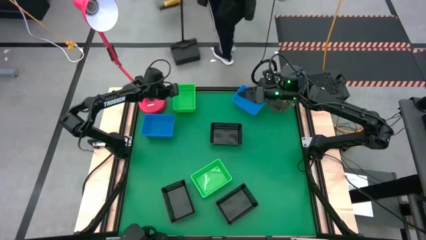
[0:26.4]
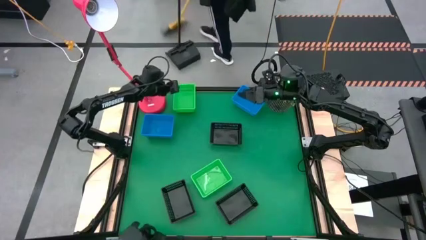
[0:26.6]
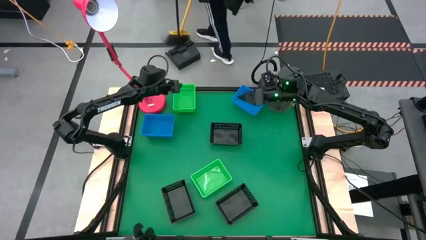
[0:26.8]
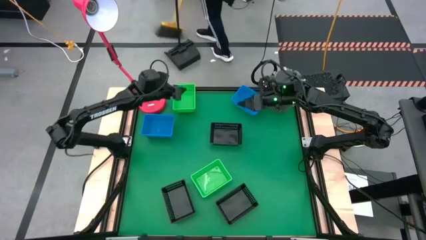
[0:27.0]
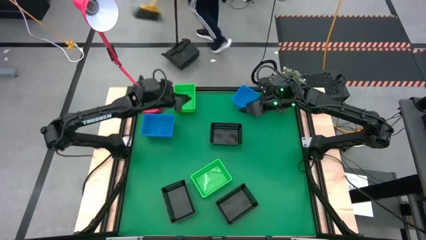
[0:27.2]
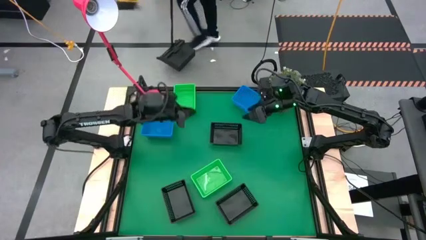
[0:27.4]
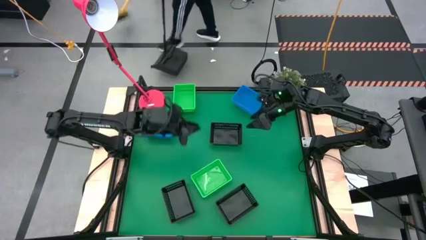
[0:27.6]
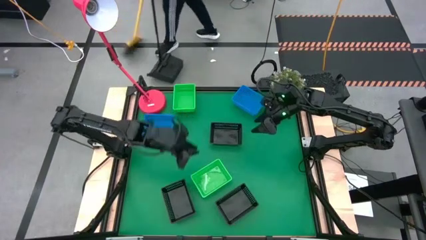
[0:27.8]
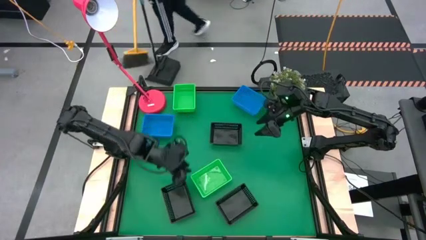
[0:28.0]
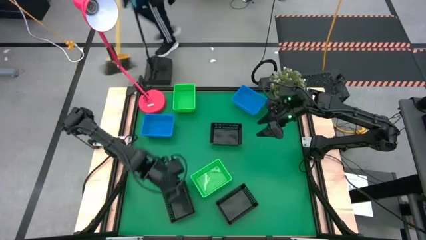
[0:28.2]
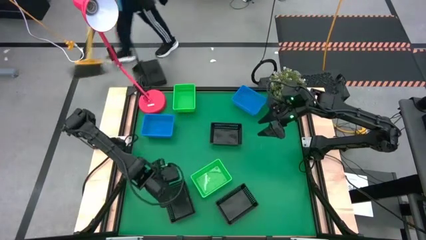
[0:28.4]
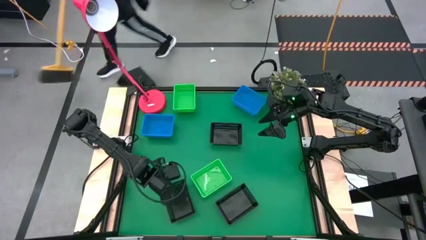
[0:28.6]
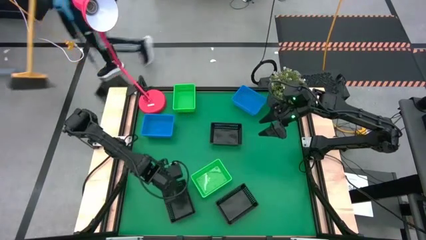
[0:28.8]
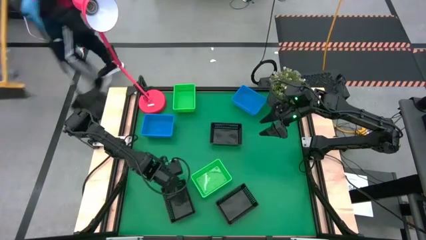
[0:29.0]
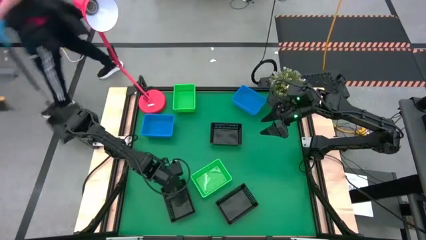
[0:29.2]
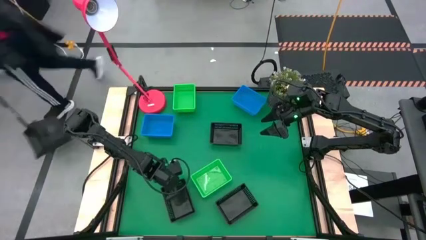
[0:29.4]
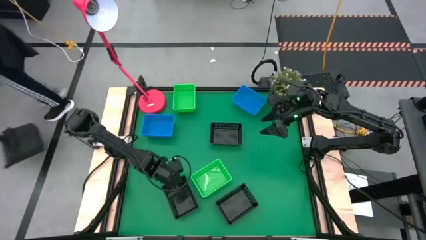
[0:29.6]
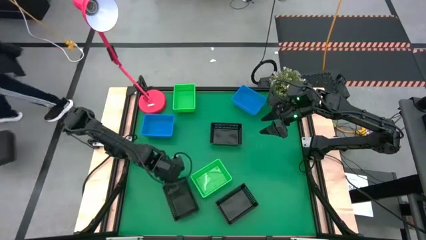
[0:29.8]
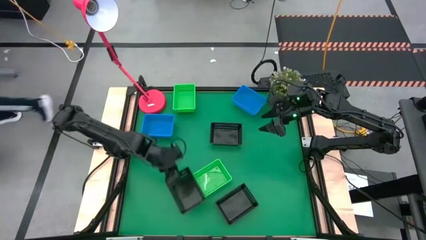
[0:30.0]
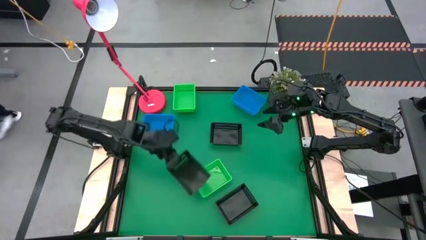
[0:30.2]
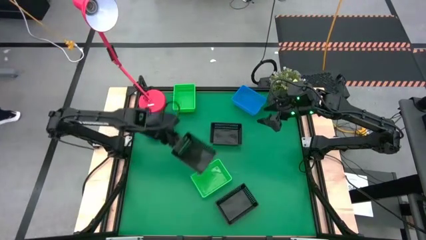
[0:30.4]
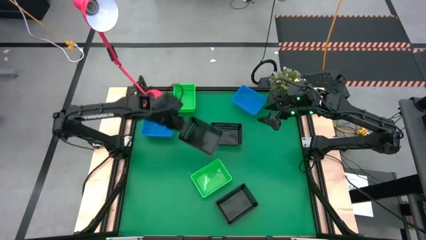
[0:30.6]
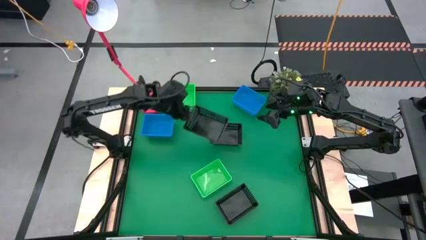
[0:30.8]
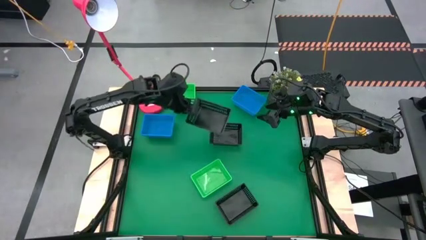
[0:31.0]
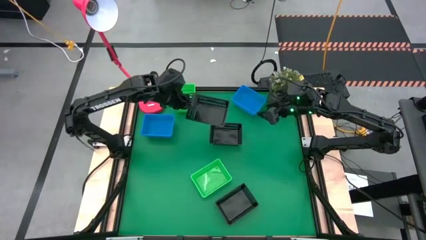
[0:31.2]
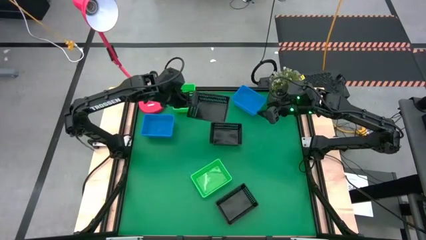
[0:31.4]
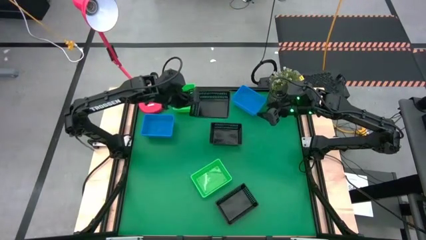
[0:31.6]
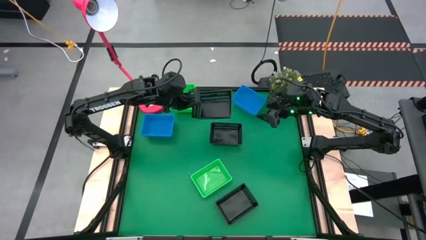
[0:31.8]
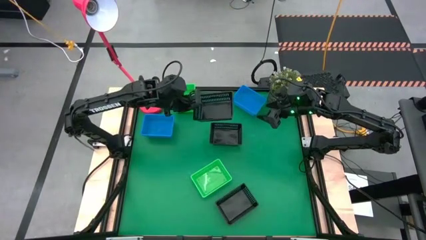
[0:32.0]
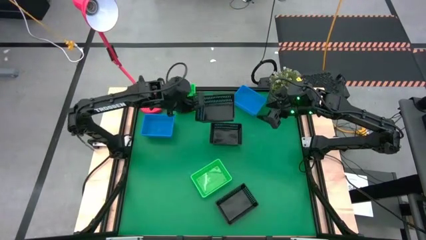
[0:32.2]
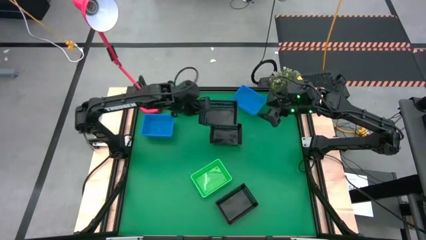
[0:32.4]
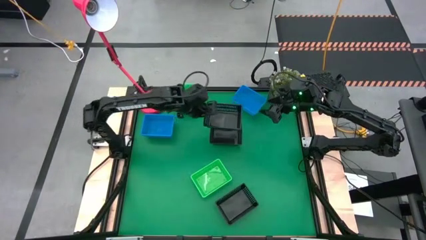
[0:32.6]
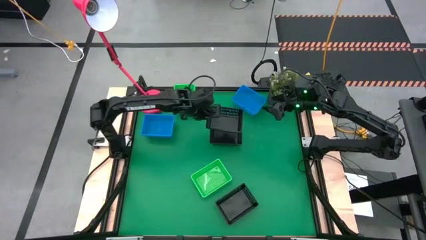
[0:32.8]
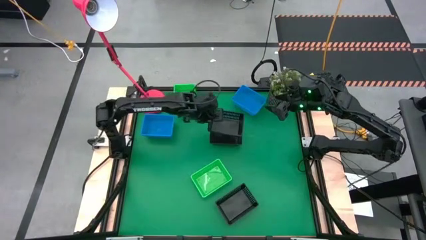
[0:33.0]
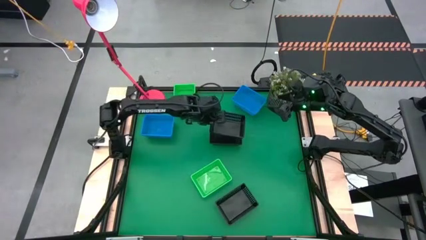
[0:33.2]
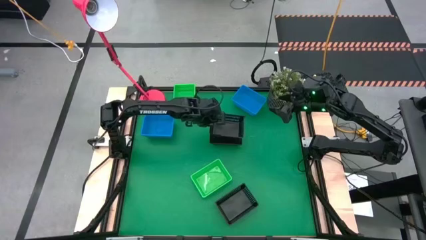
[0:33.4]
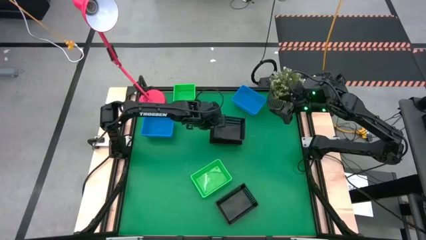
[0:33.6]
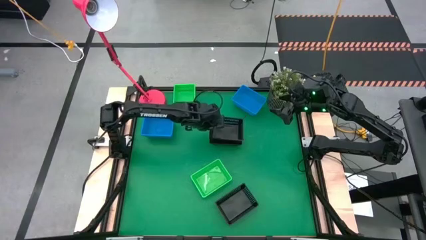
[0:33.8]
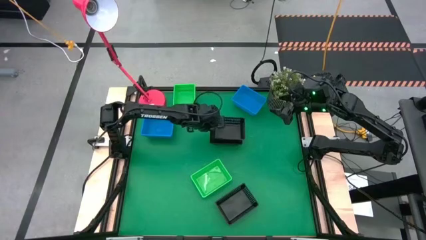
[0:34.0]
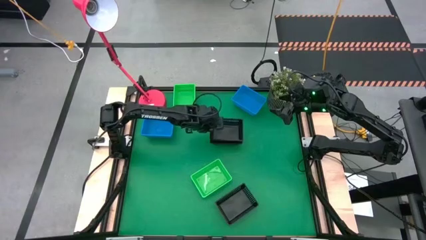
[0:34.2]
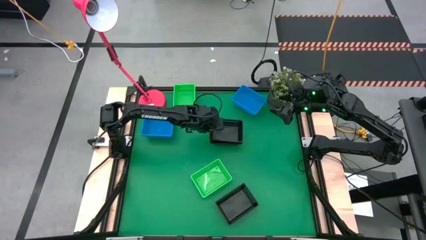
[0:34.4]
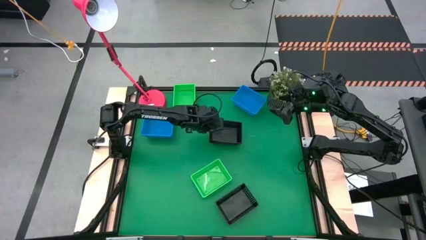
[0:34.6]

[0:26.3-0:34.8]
Stack the bottom left black bin on the top black bin

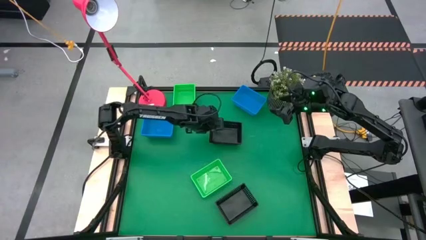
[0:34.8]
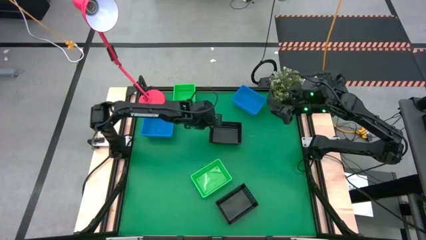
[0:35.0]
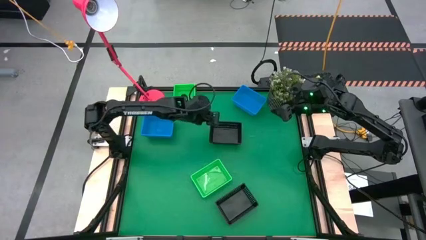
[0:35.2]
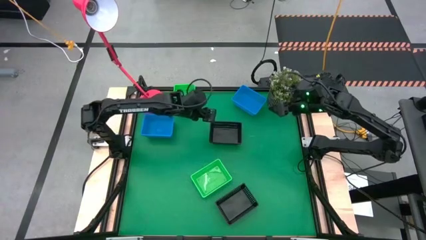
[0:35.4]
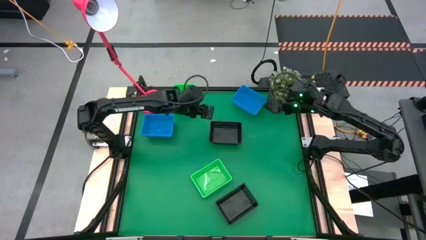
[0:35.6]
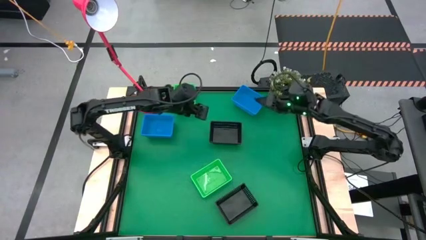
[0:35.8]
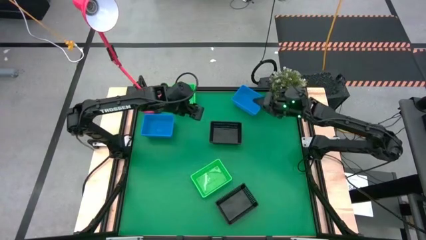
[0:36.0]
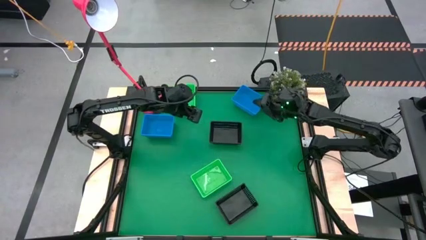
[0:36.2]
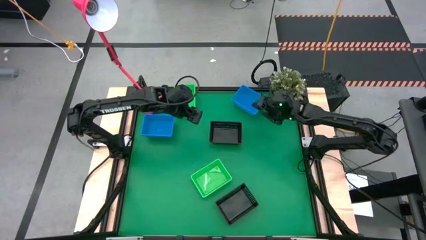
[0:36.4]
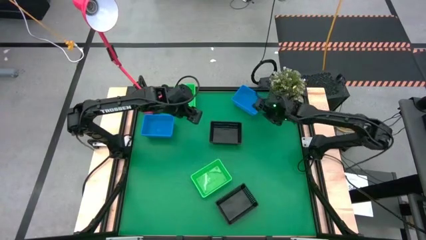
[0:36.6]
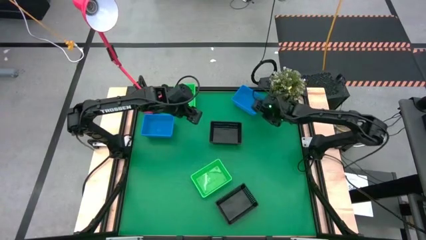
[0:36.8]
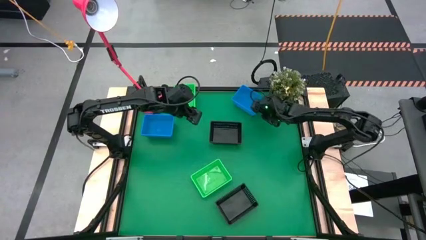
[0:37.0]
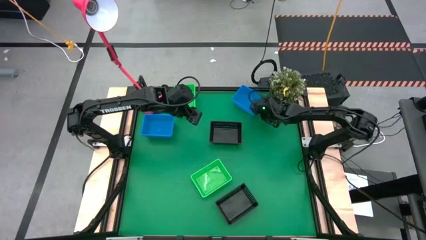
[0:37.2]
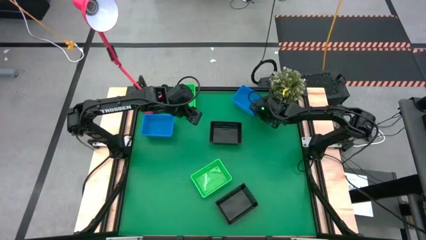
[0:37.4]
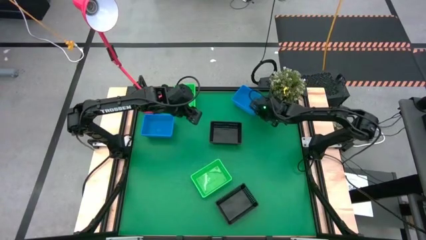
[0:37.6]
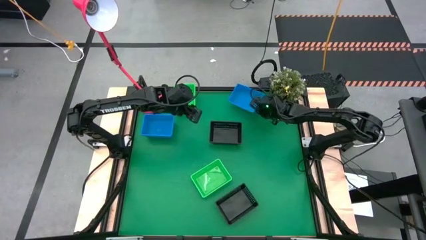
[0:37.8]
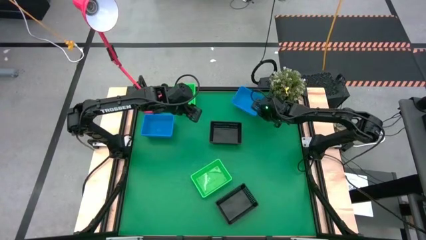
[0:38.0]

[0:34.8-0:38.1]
Stack the right blue bin on the left stacked blue bins

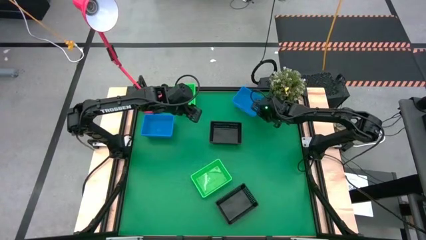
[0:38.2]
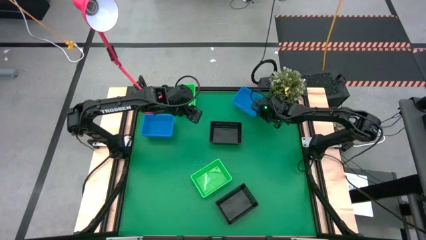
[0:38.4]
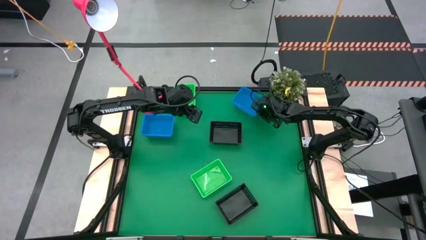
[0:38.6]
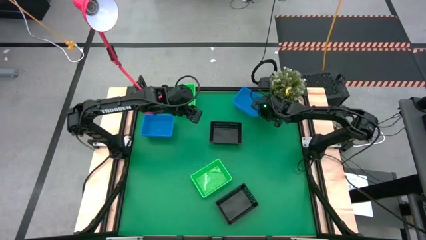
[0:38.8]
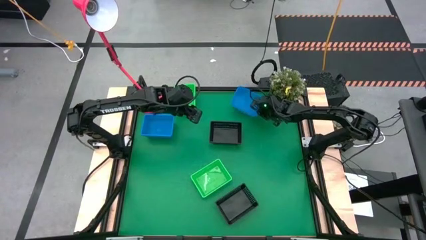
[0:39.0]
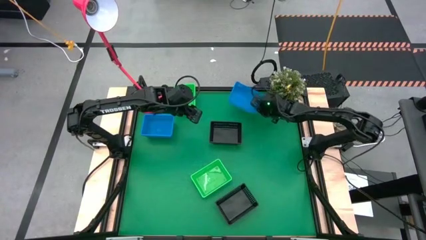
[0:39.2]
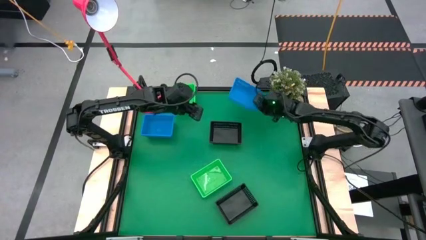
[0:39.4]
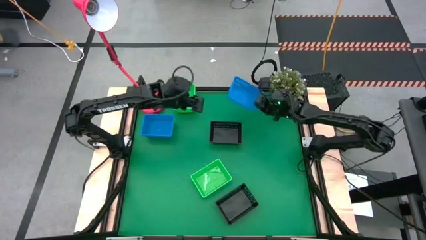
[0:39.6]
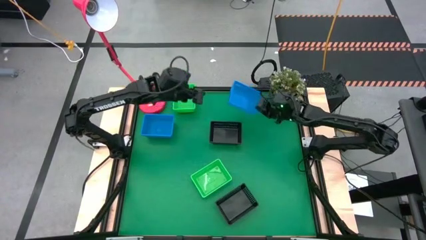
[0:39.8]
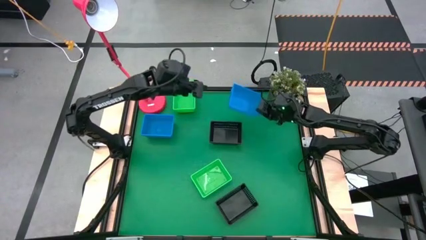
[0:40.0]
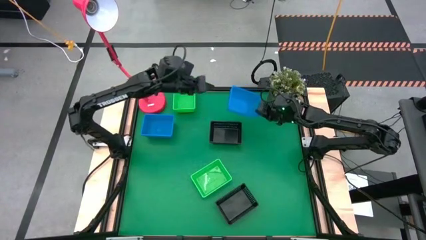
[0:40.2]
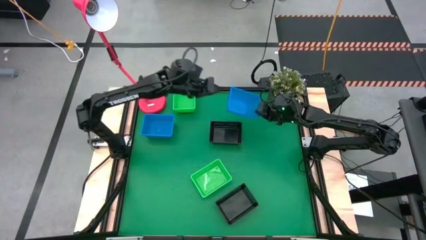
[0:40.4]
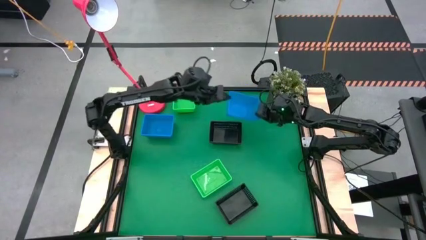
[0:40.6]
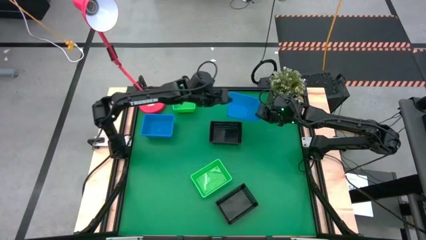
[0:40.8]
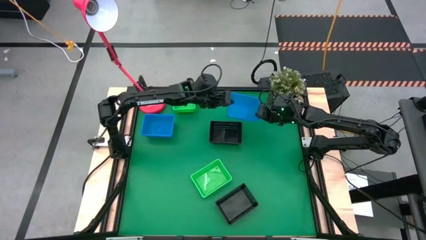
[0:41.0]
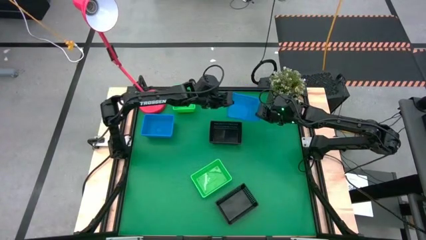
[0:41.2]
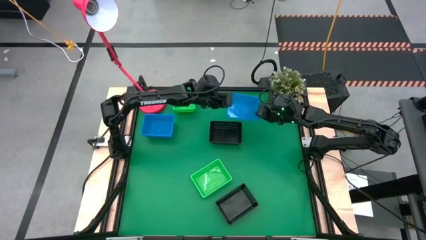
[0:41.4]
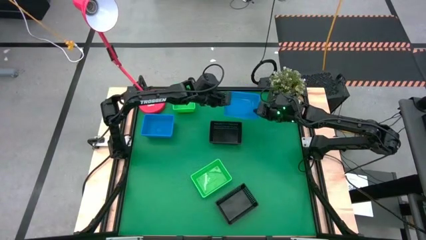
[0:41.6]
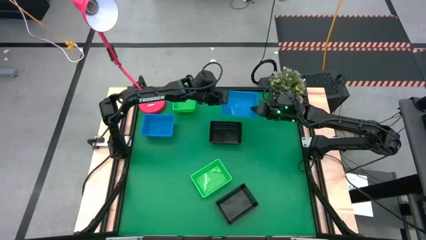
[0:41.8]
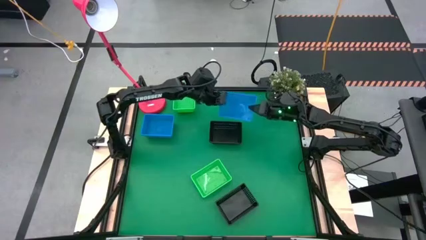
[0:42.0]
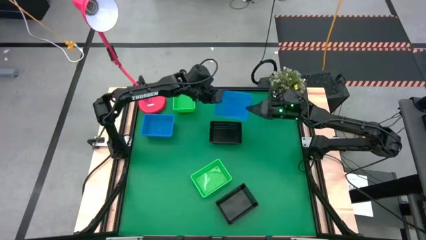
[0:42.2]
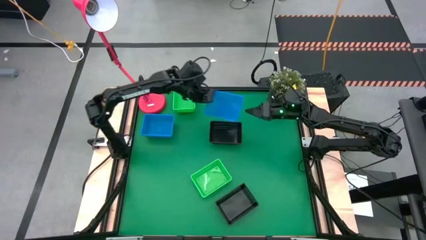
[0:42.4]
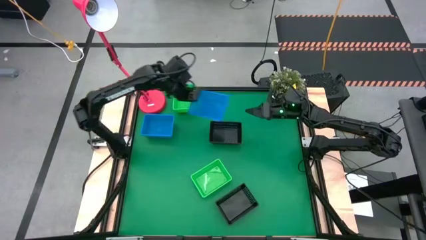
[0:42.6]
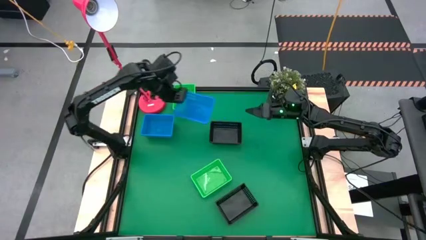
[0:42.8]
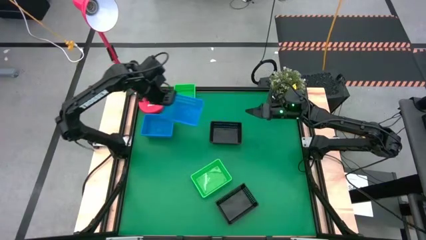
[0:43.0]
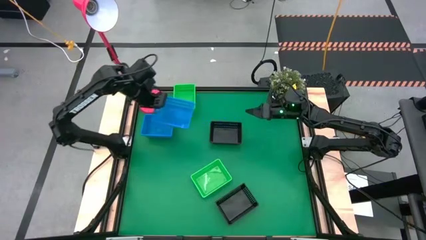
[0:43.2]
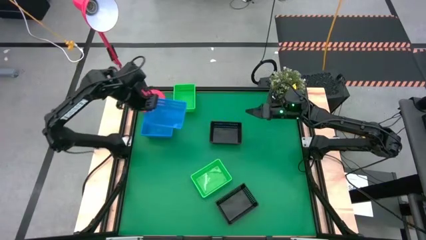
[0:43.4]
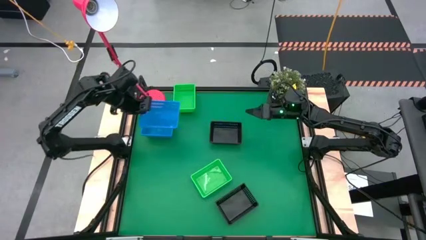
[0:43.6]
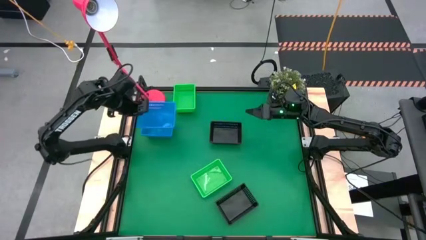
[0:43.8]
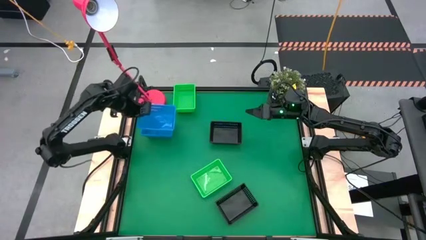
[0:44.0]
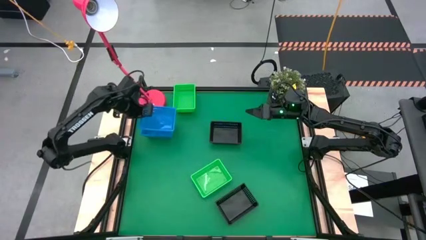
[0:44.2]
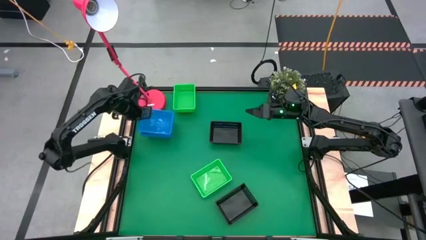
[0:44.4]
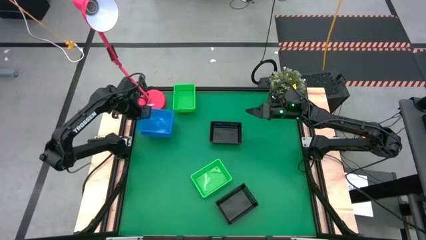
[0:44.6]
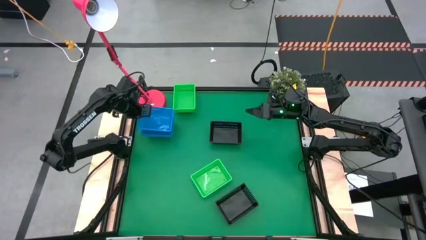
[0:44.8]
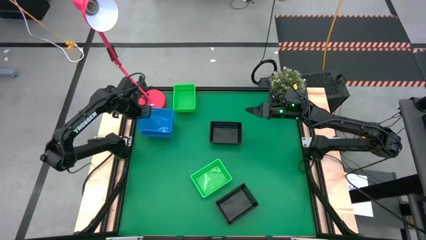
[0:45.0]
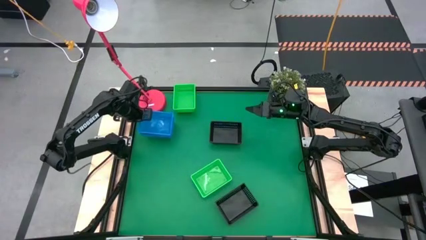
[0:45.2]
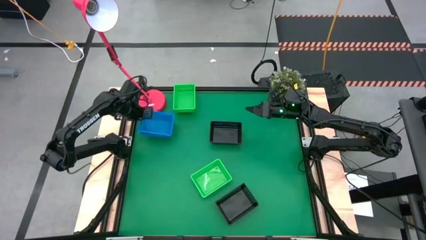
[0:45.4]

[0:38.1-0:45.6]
Stack the right blue bin on the left stacked blue bins
